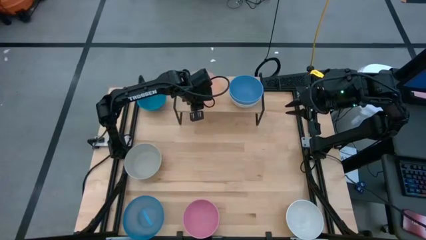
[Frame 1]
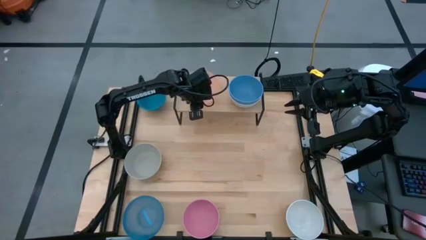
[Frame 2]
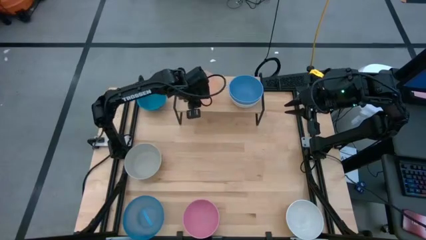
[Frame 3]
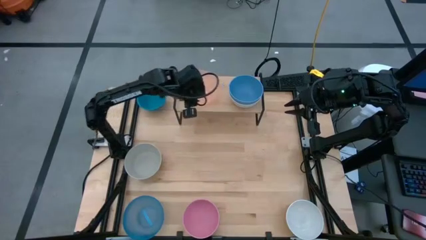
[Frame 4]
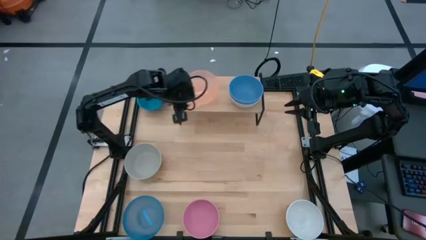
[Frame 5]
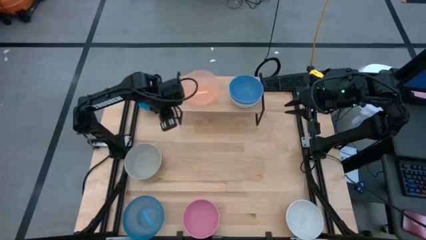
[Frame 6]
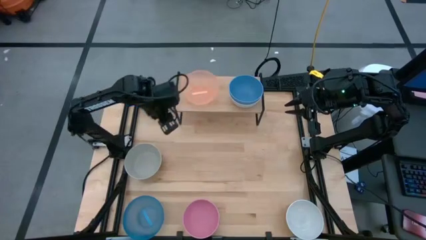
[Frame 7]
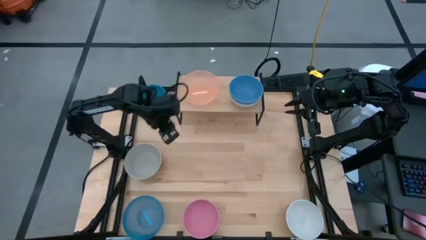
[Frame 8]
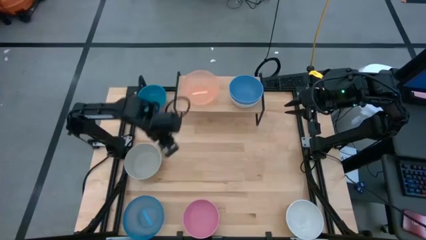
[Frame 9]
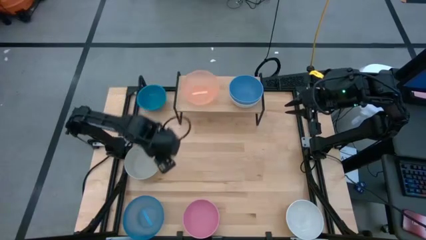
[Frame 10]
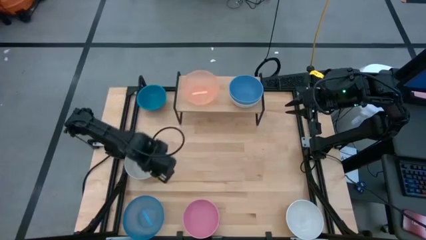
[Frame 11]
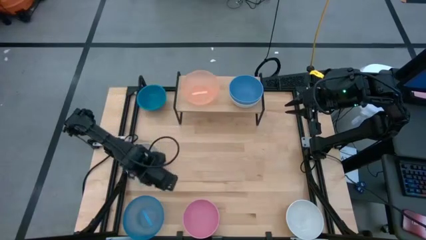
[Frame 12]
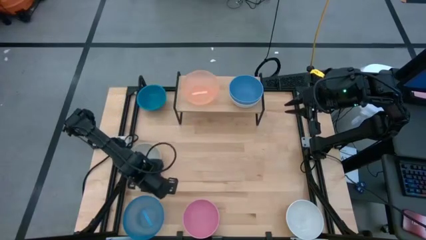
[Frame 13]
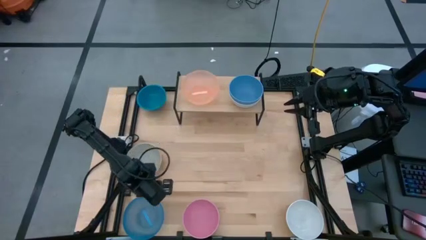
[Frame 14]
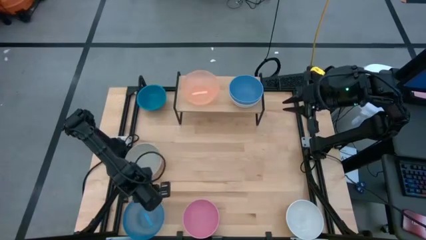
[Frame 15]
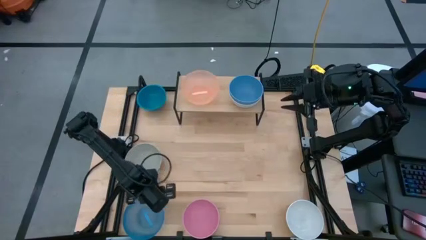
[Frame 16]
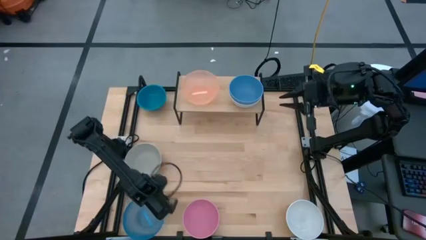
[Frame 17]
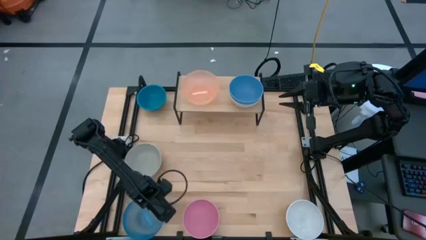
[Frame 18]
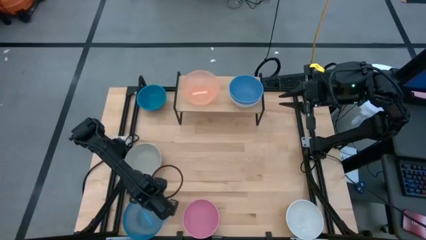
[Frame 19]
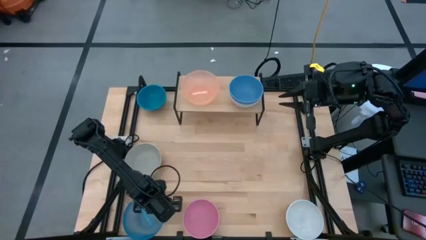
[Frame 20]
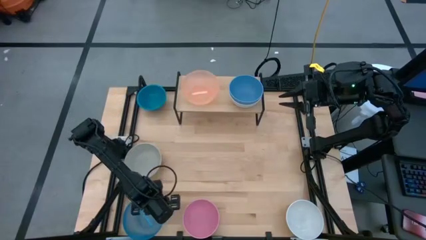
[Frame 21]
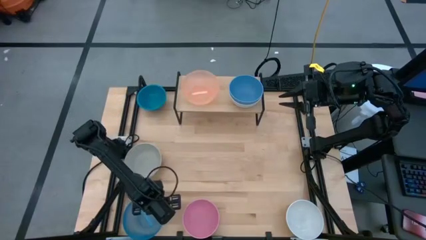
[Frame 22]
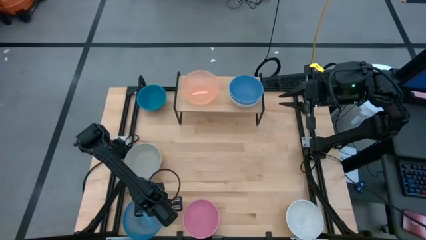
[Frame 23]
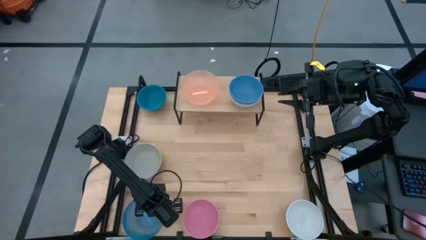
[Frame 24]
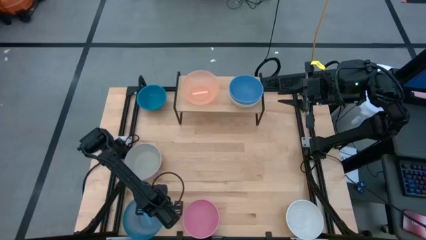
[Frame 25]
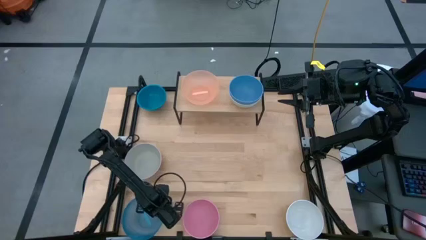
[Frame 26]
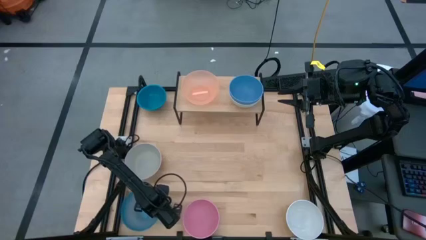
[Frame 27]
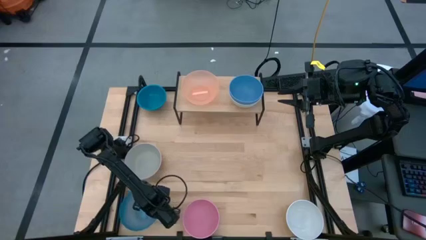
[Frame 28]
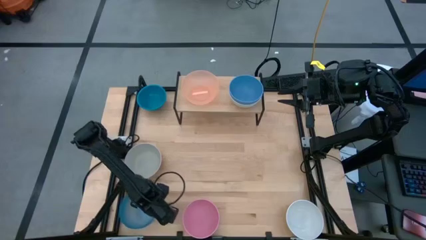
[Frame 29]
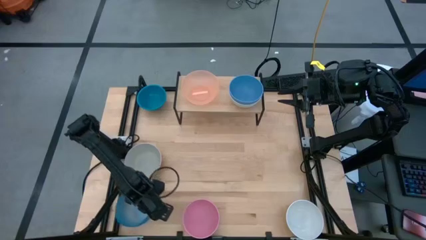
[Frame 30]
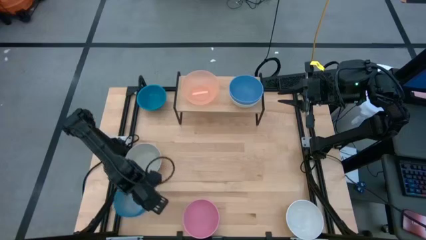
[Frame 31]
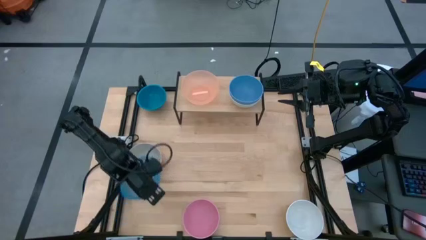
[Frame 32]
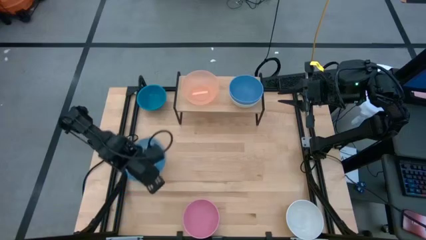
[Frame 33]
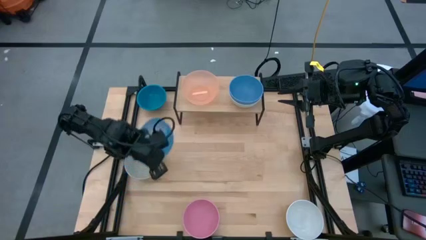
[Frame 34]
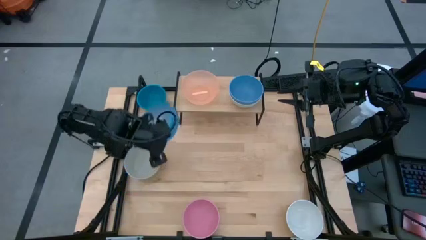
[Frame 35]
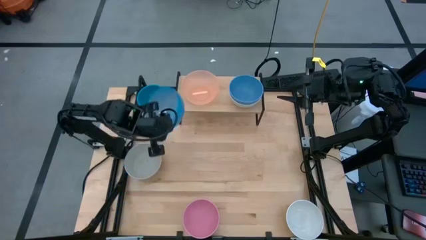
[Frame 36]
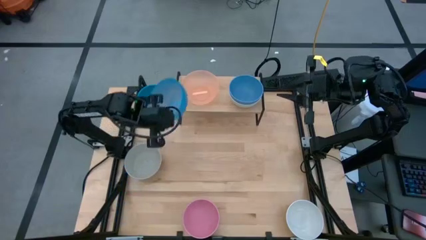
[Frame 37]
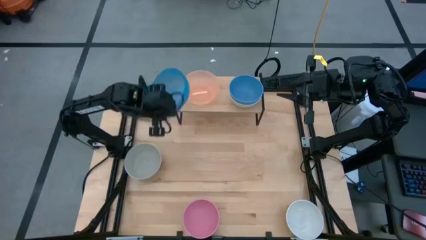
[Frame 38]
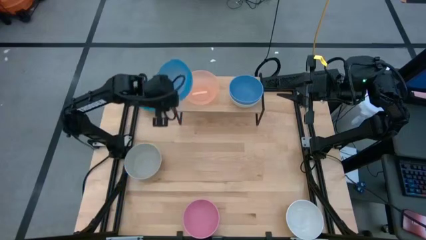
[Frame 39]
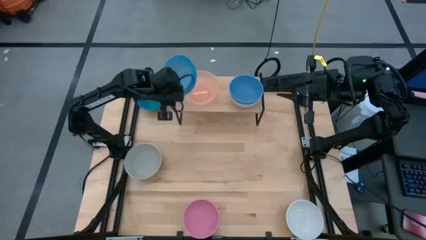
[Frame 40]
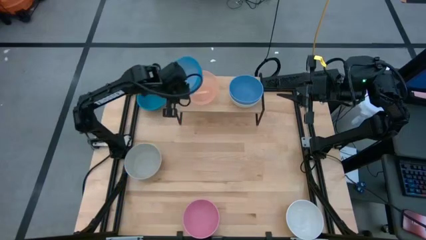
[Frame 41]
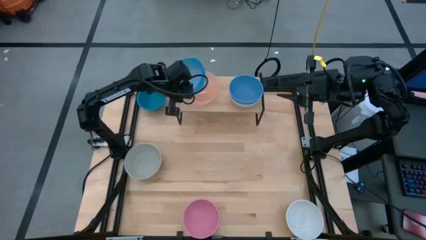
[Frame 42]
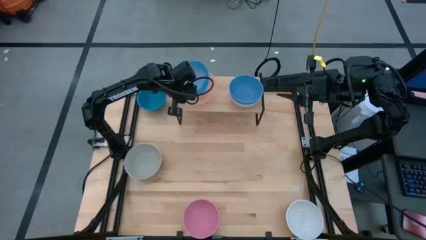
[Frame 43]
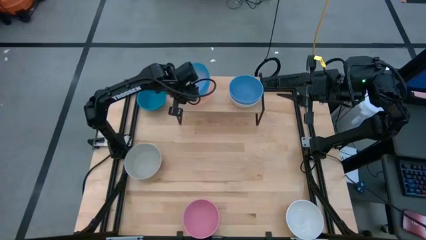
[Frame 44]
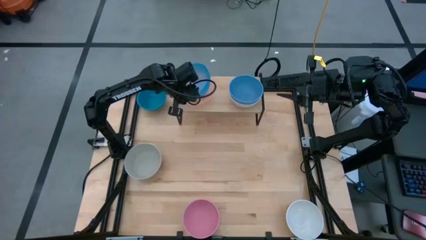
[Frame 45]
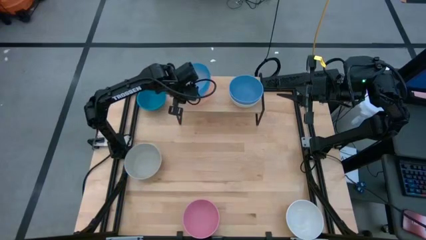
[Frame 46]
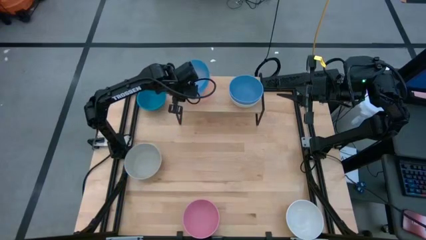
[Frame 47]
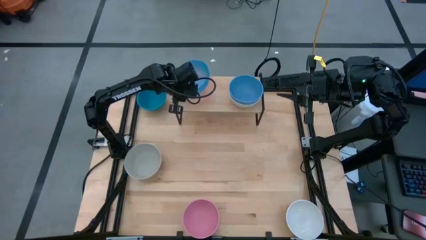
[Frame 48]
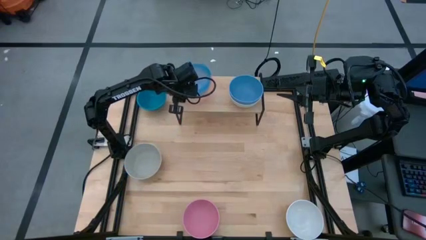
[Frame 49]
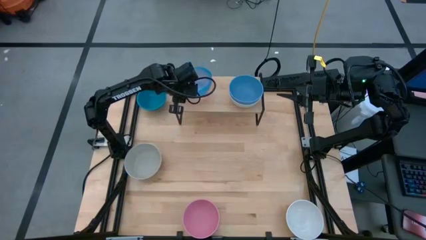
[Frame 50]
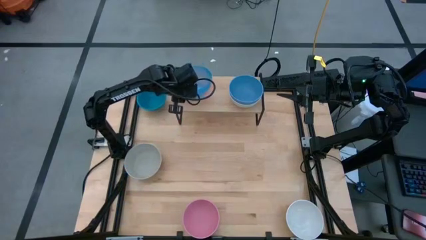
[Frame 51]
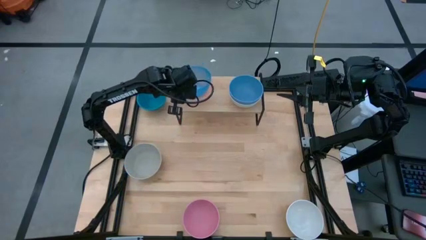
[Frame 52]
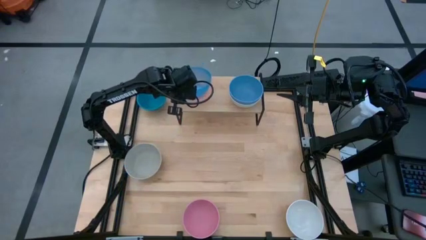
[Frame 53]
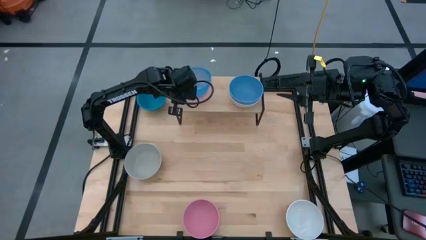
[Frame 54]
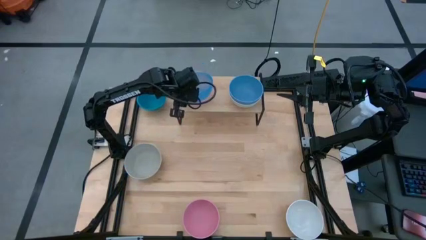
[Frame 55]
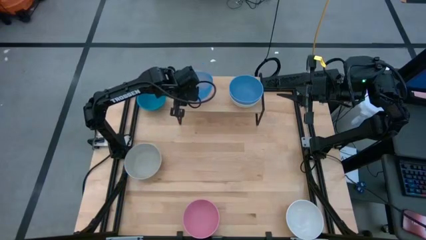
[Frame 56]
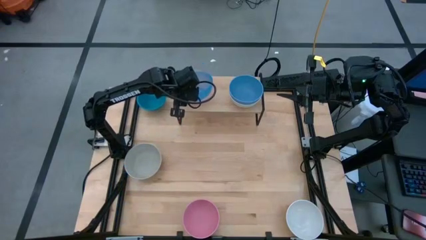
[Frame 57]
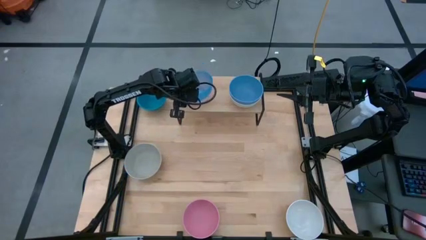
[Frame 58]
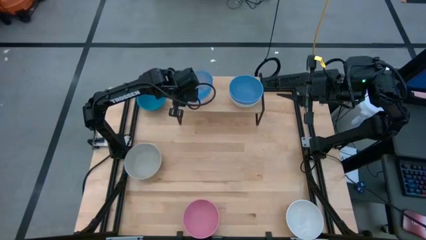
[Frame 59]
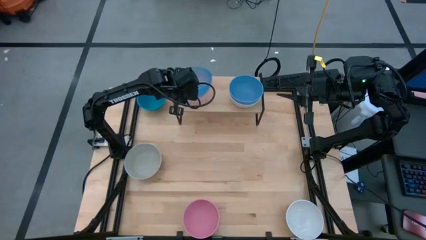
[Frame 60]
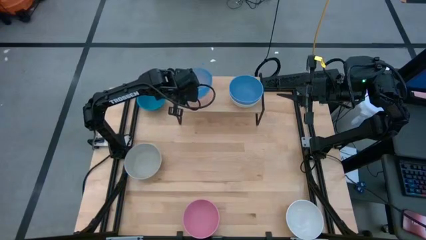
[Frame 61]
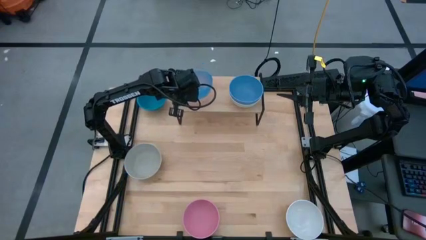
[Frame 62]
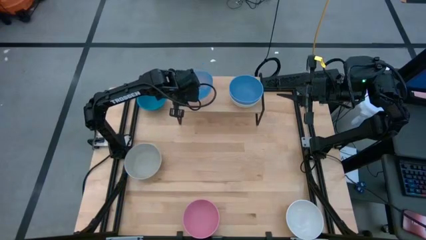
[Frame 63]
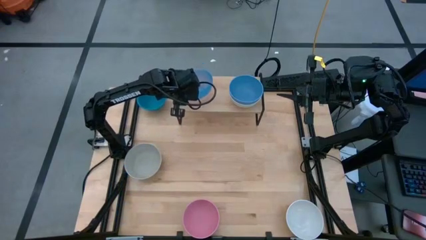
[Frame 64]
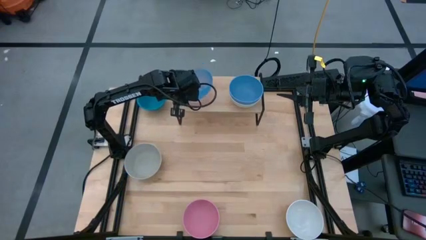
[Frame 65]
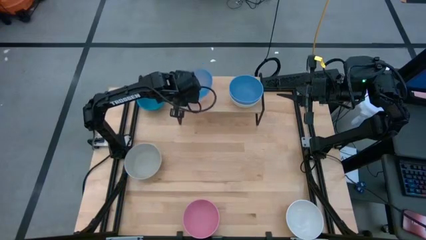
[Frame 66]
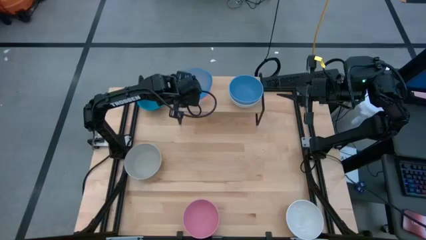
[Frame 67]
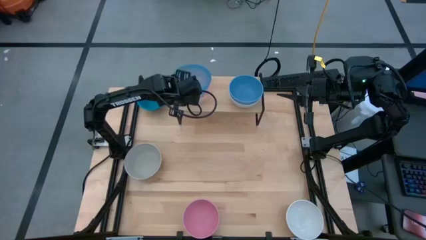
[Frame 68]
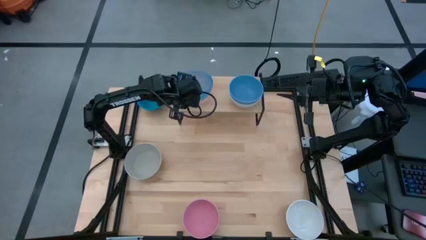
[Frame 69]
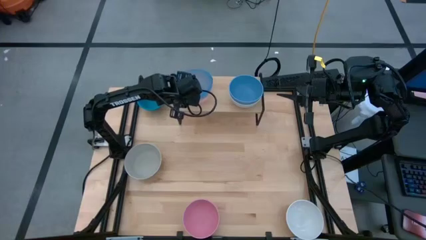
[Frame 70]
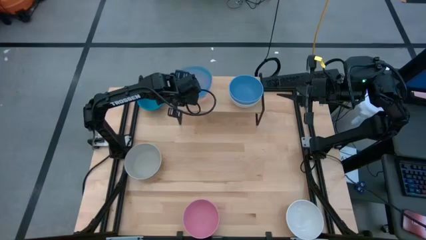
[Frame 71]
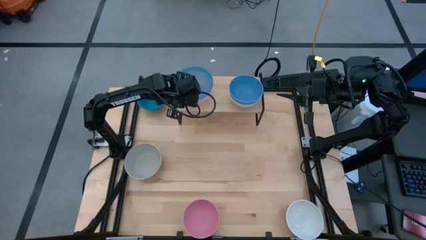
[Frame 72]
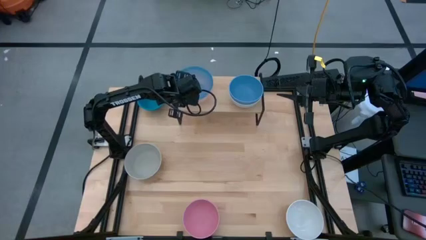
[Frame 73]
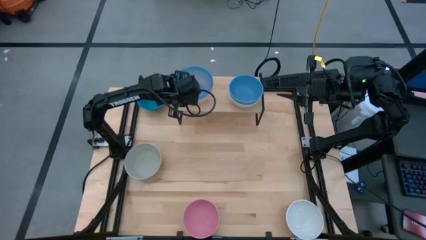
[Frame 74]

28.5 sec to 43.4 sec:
Task: Place and stack bowls onto a shelf
Stack the blue transparent bowl on top of the orange transparent bowl on the shelf

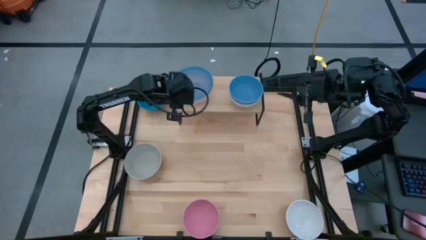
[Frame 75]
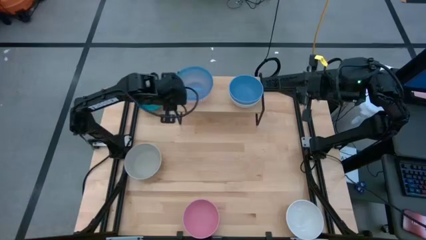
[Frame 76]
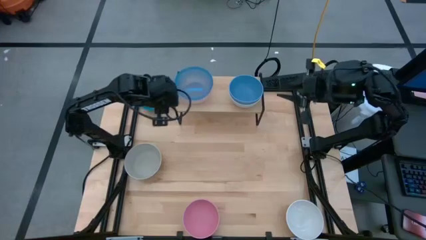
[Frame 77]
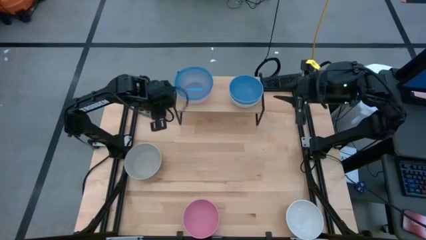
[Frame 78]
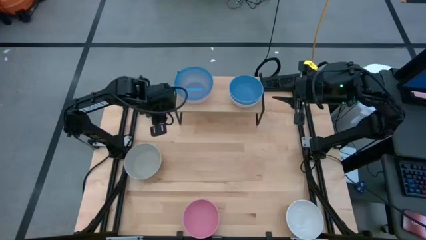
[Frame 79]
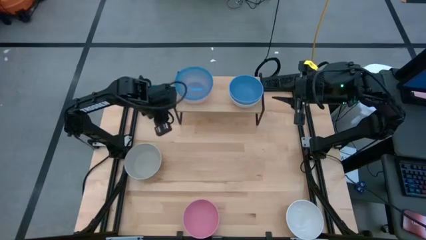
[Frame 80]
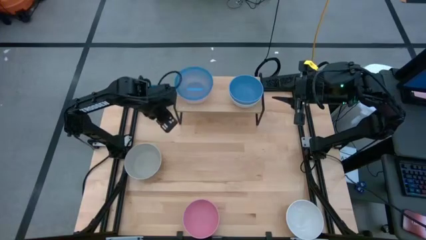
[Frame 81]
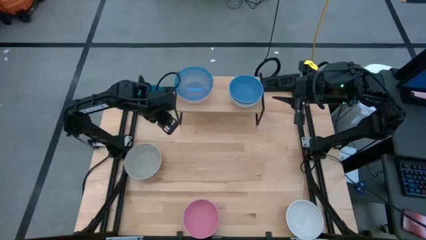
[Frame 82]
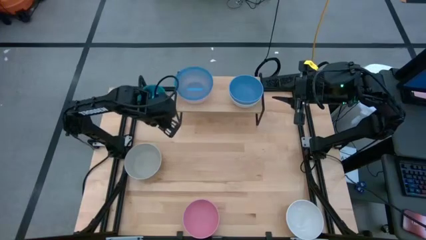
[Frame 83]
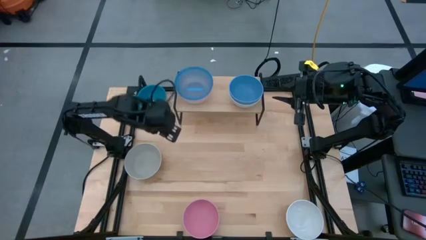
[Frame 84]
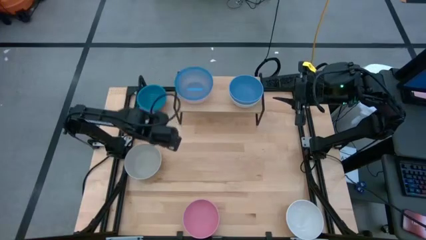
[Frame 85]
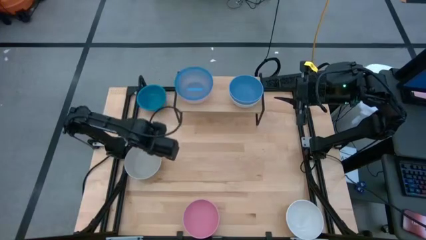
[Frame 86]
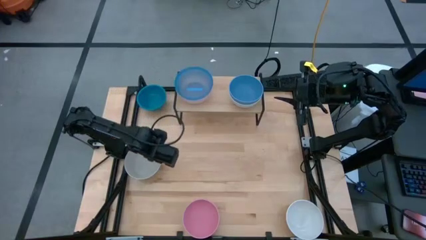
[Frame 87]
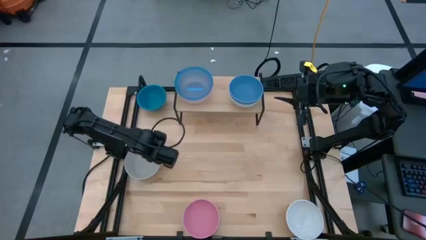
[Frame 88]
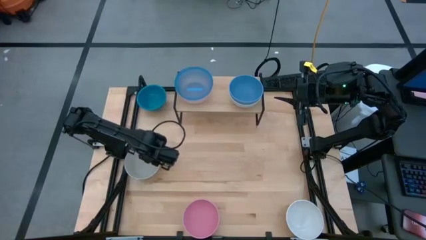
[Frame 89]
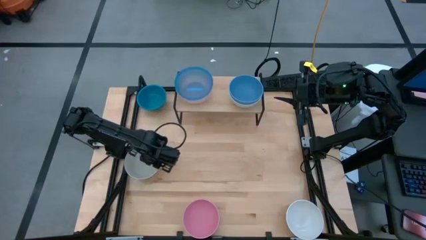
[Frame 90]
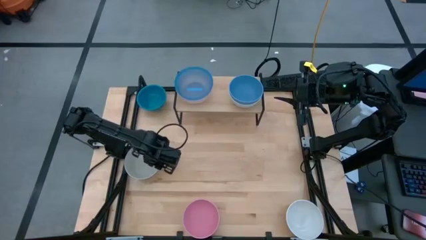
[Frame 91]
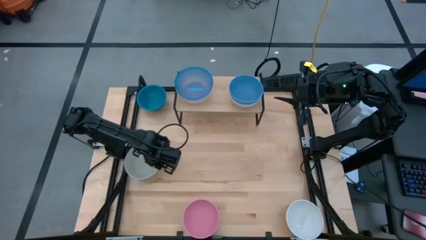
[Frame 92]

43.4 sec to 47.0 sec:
Stack the gray bowl on top of the blue transparent bowl on the shelf
